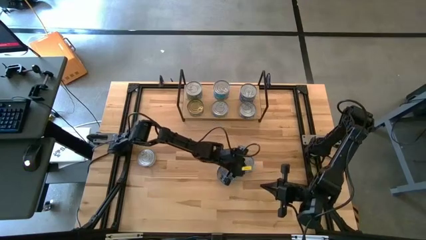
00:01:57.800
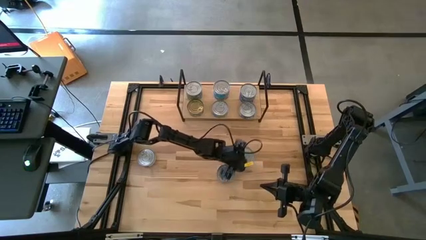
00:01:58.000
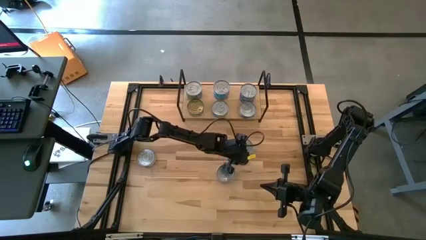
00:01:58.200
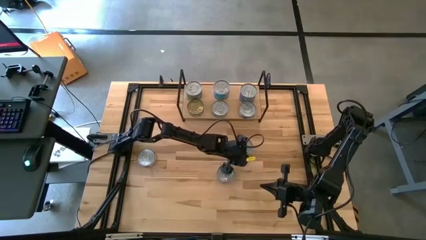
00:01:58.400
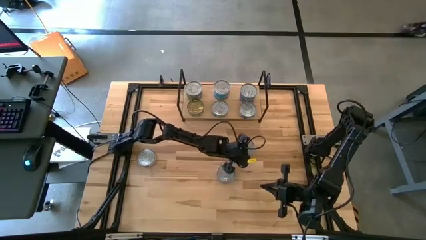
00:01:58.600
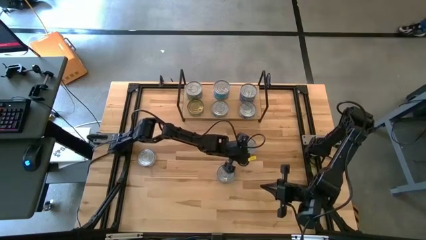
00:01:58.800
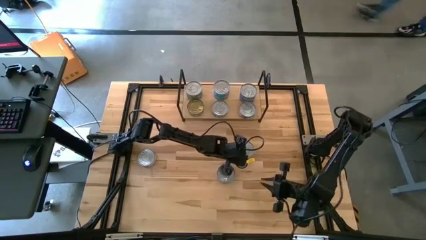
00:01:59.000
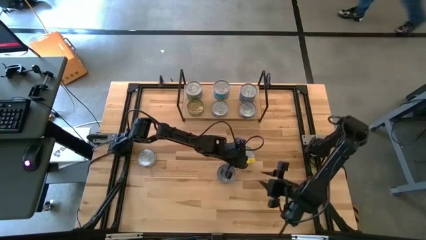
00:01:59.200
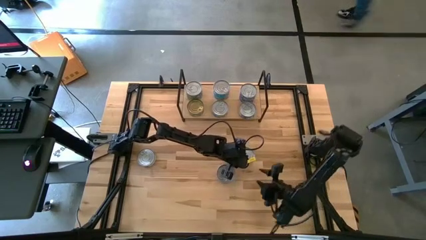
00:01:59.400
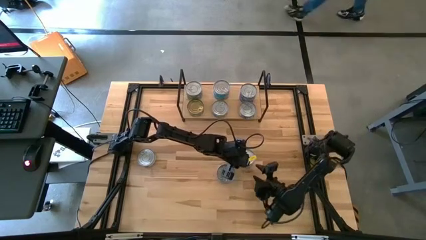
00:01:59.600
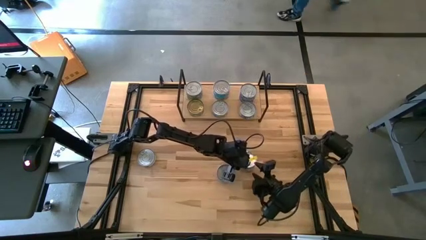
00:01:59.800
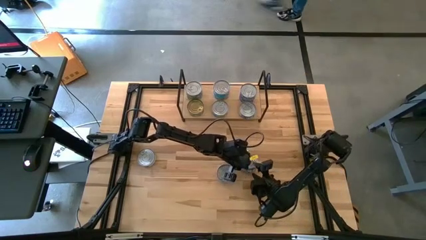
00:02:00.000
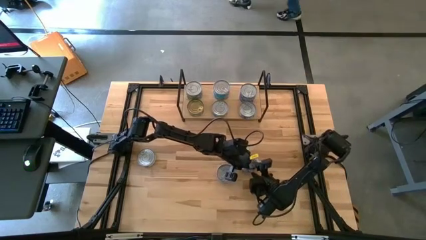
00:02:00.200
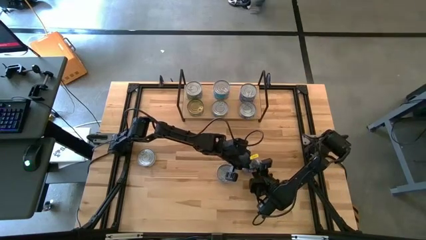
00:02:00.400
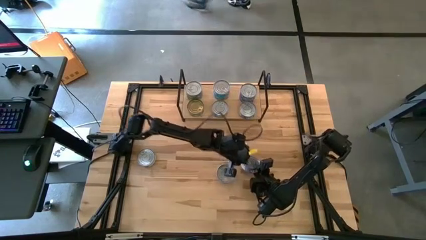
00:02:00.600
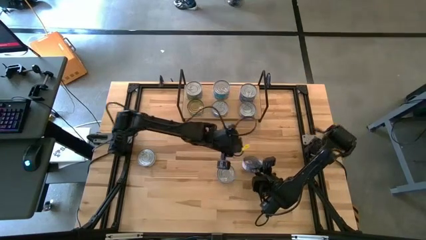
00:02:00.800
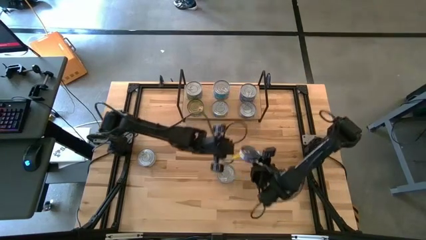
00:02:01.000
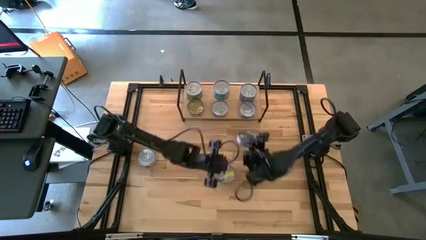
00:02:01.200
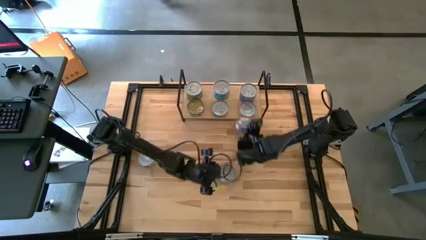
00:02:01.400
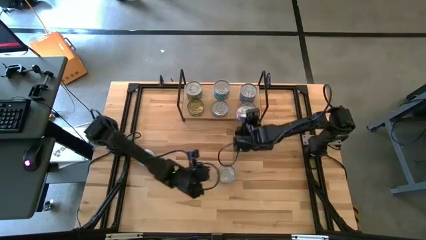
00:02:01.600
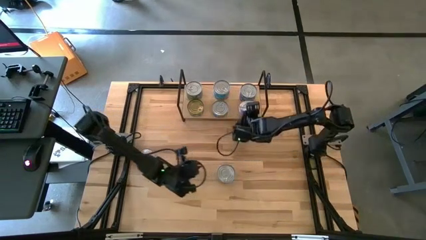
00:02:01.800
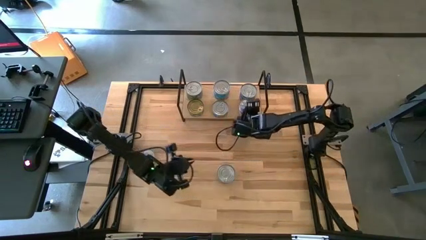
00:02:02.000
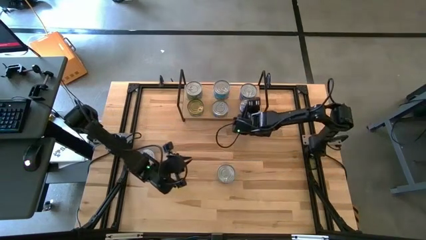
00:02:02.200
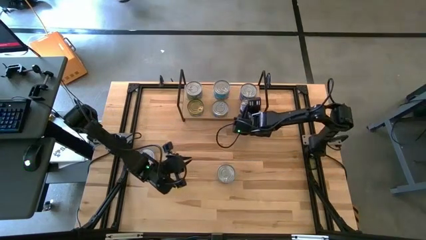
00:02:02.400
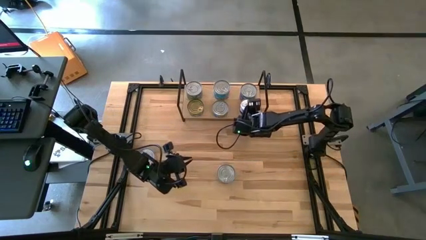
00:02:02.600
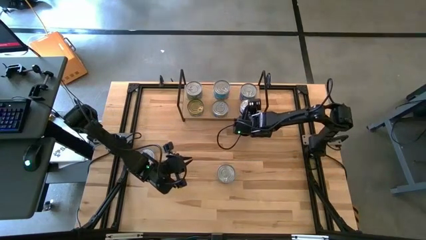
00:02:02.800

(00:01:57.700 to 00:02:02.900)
Task: Stack canned seafood by type on shelf
Stack the blue tuna can on top of the other blue tuna can on the shelf

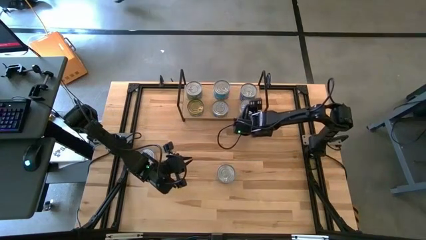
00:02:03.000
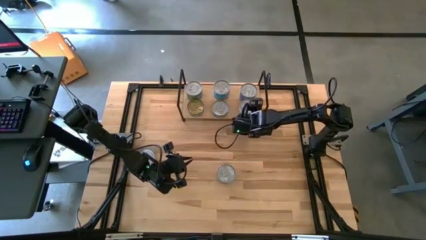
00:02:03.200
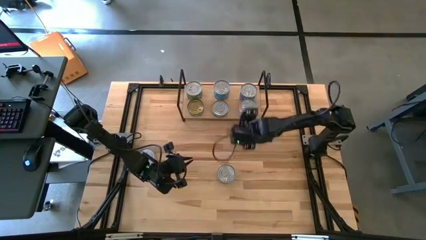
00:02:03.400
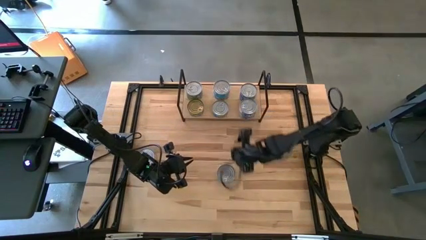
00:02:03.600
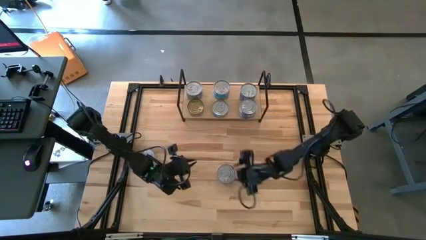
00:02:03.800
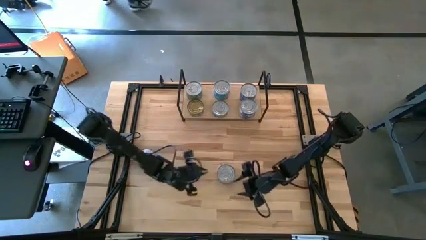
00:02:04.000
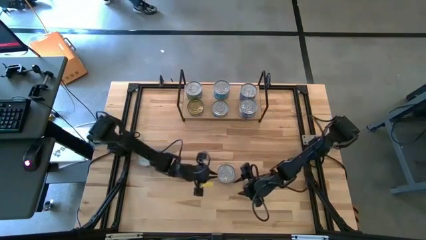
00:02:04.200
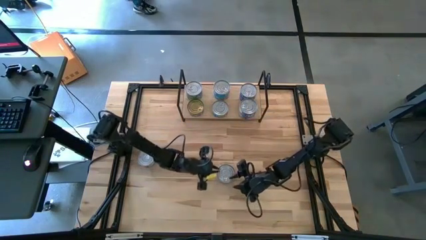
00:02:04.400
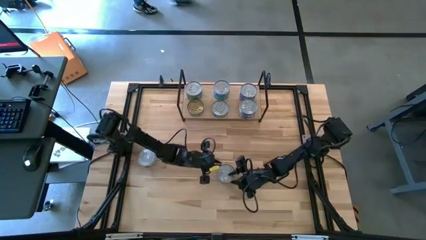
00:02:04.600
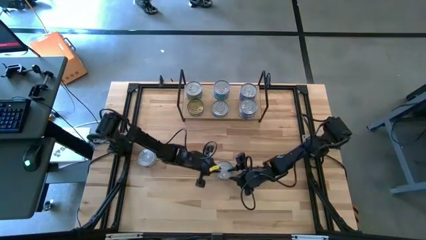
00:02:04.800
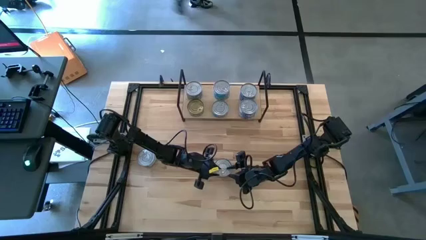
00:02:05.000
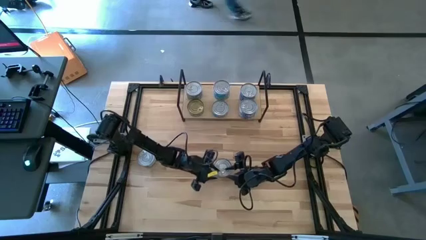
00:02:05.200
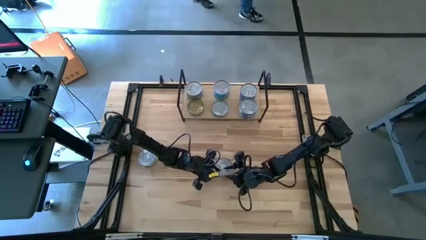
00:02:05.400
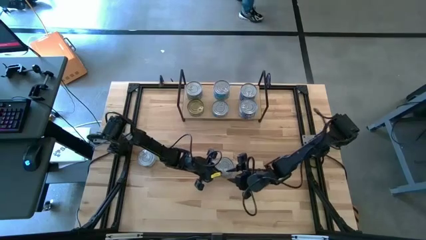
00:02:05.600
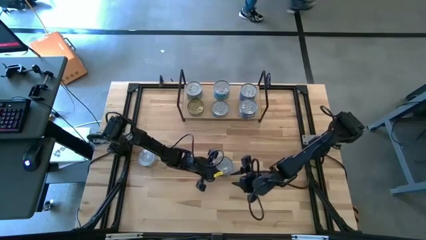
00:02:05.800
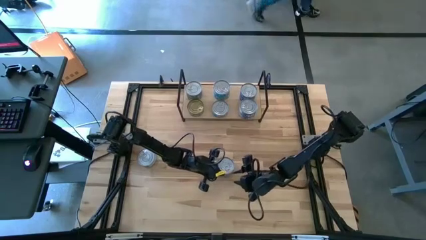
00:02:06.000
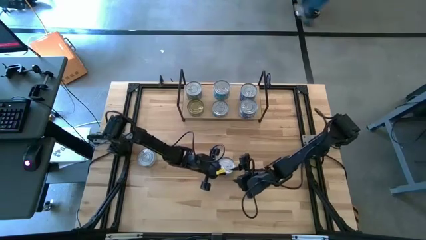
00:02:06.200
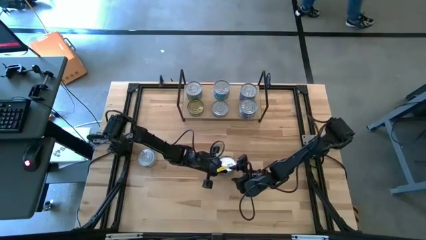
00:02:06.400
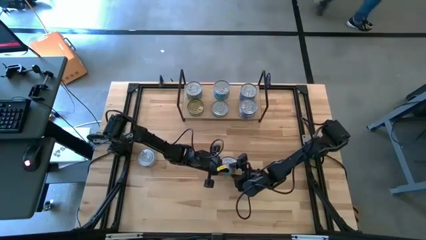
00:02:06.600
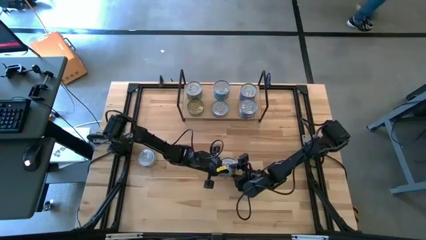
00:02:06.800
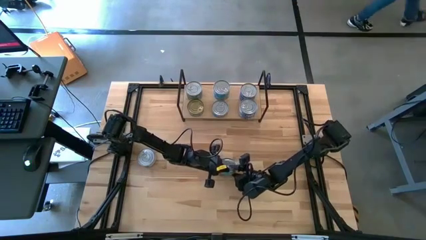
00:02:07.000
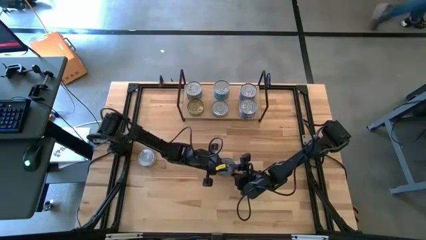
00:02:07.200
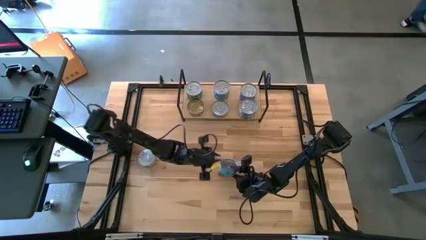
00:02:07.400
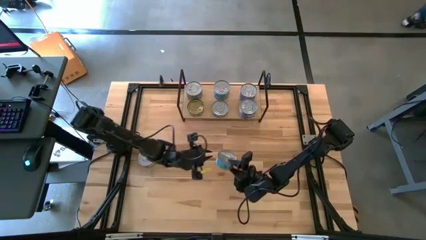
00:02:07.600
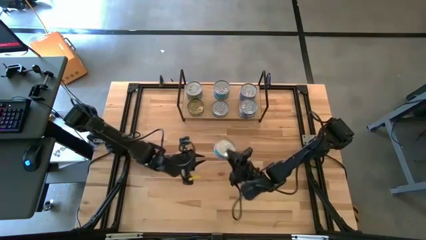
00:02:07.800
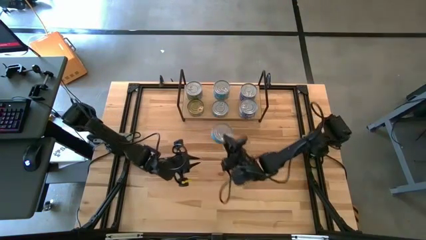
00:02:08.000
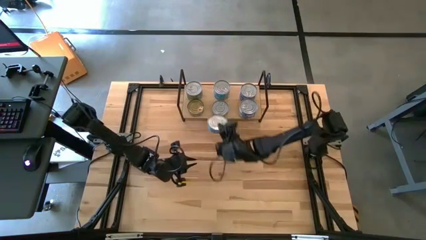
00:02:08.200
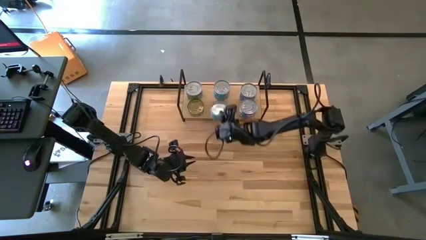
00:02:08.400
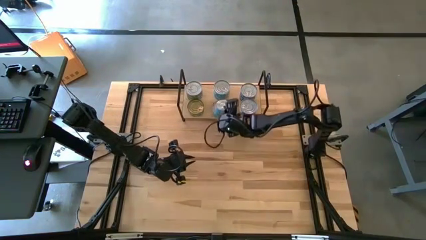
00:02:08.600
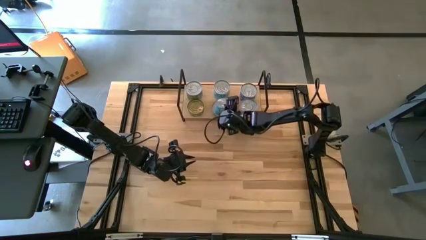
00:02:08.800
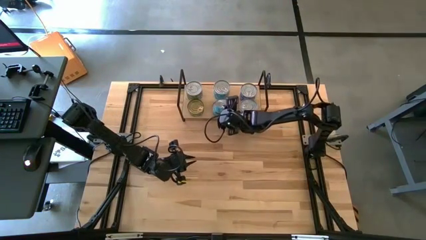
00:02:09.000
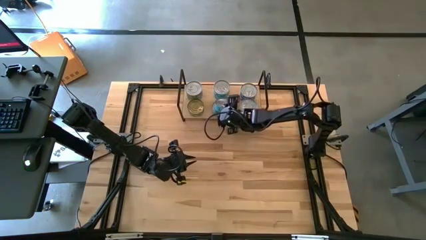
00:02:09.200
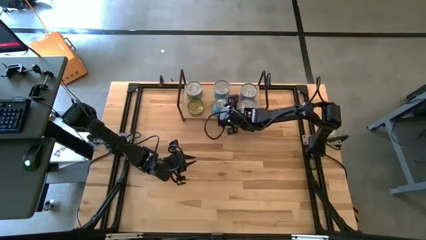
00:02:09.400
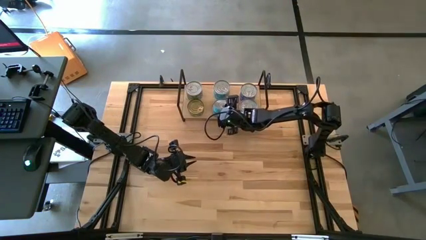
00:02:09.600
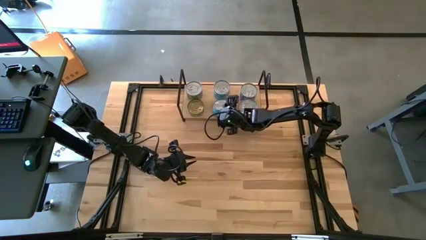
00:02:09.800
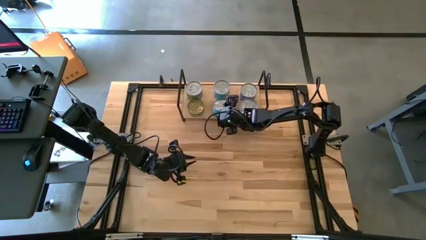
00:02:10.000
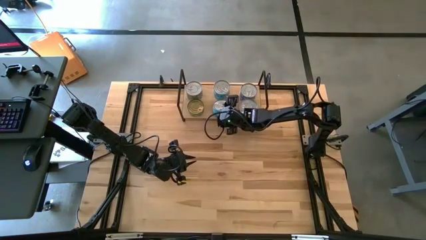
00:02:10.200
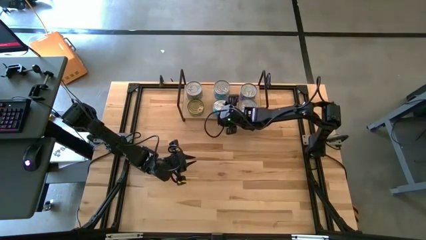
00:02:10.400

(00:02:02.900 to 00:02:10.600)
Stack the yellow and blue tuna can on top of the other yellow and blue tuna can on the shelf

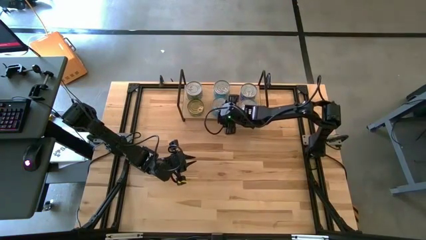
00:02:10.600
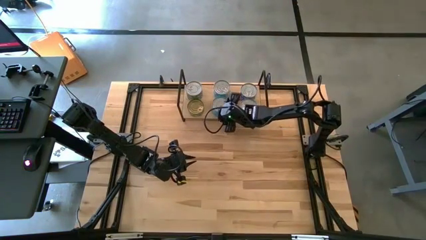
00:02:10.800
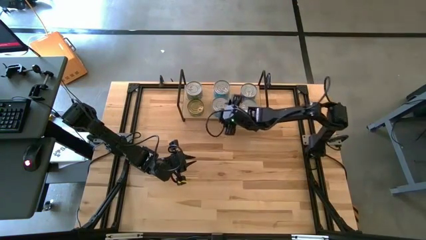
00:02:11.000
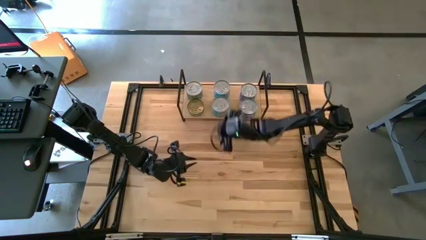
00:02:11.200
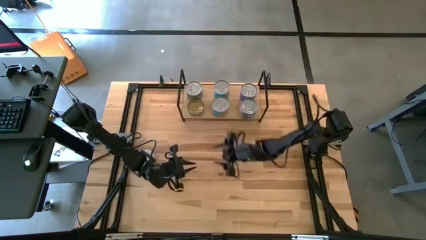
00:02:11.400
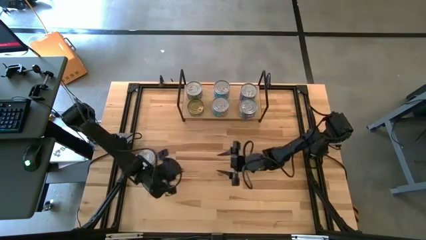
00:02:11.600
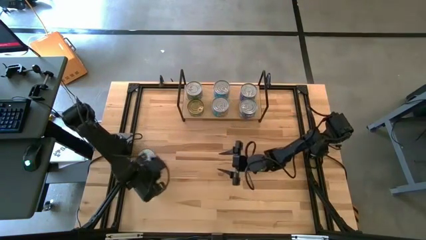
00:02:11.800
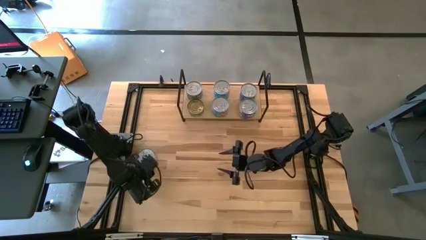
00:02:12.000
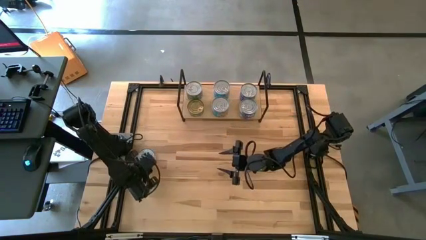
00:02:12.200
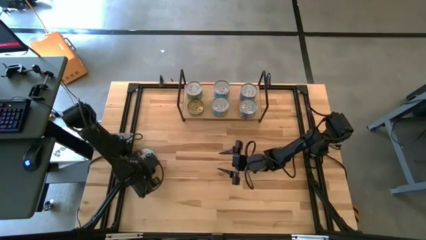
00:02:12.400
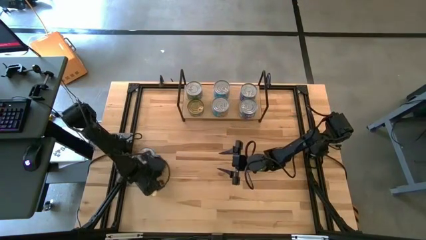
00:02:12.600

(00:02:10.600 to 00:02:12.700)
Stack the green tuna can on top of the other green tuna can on the shelf
